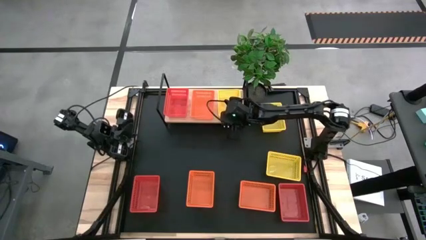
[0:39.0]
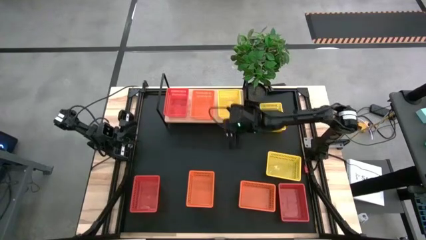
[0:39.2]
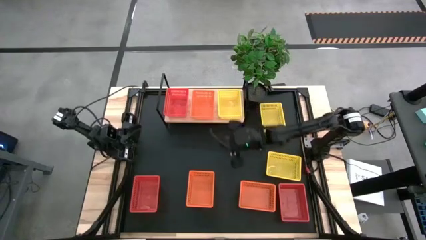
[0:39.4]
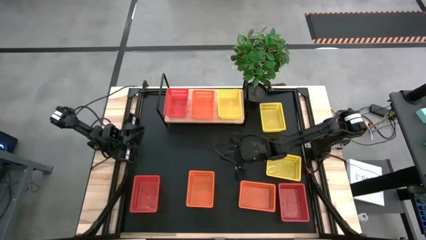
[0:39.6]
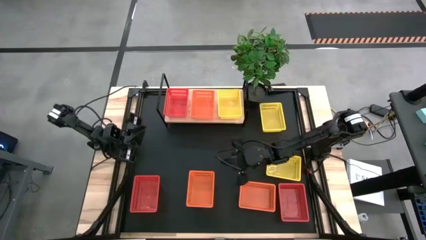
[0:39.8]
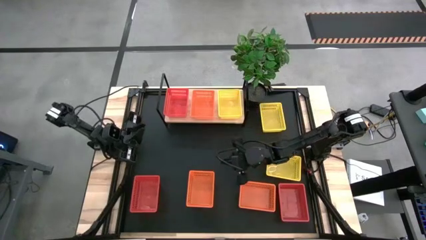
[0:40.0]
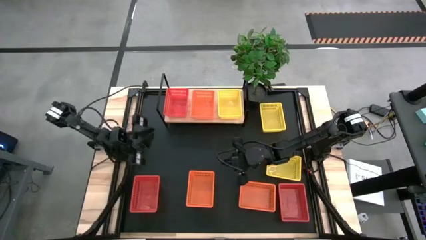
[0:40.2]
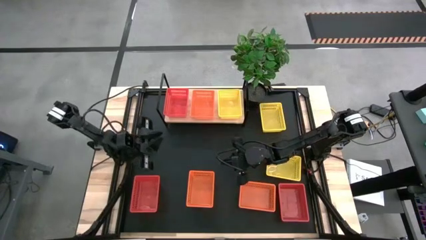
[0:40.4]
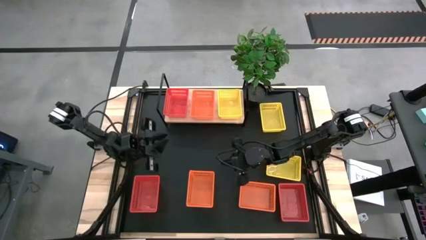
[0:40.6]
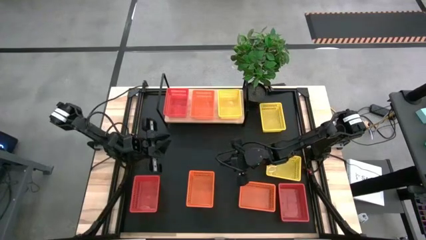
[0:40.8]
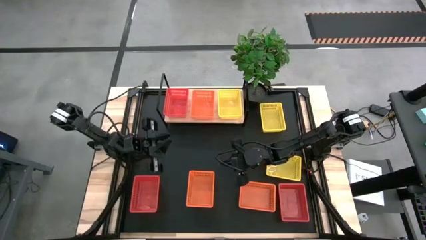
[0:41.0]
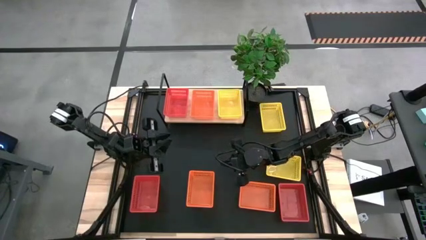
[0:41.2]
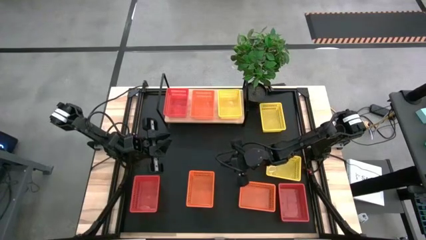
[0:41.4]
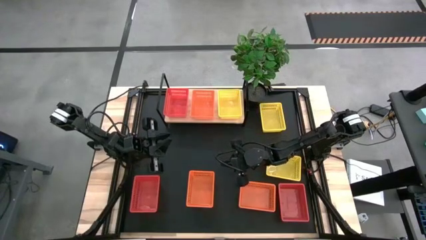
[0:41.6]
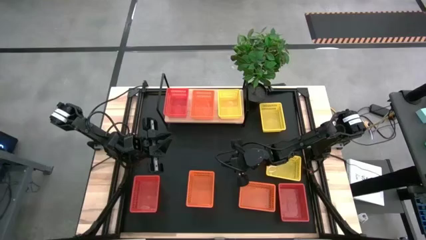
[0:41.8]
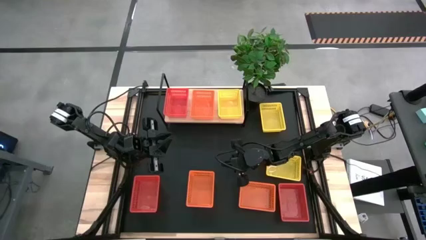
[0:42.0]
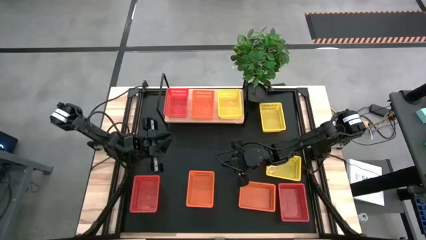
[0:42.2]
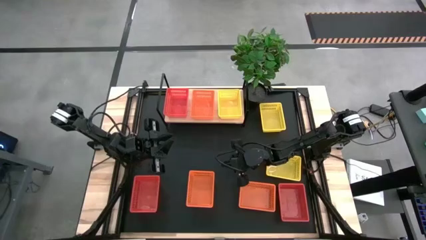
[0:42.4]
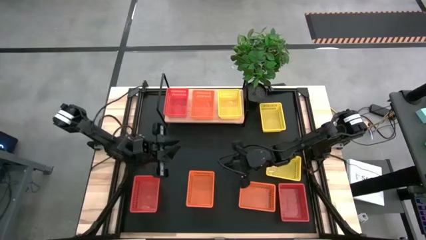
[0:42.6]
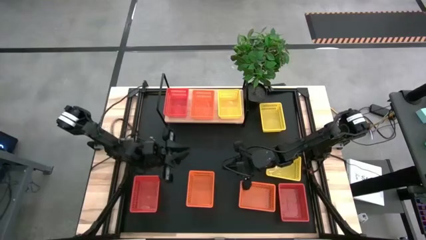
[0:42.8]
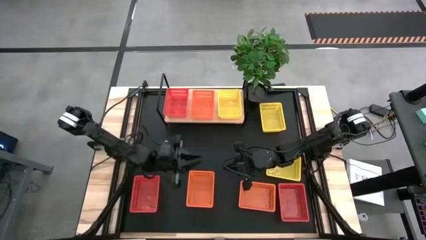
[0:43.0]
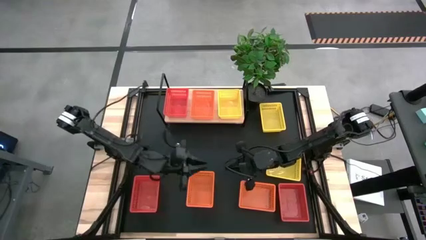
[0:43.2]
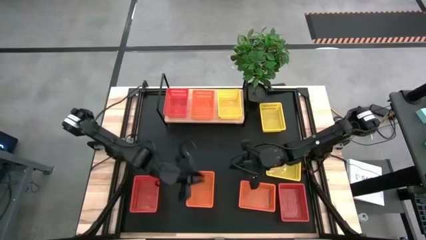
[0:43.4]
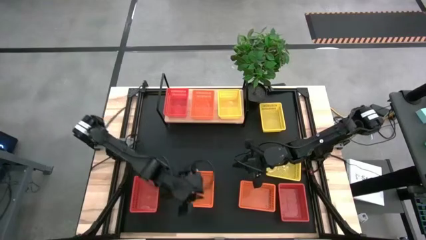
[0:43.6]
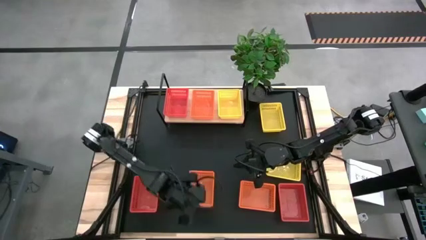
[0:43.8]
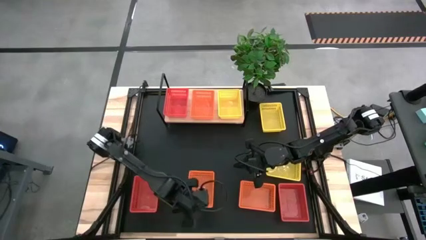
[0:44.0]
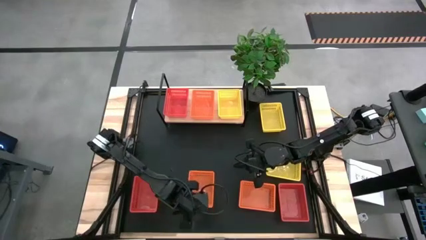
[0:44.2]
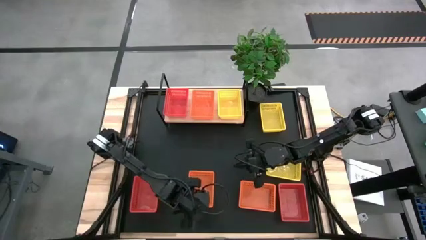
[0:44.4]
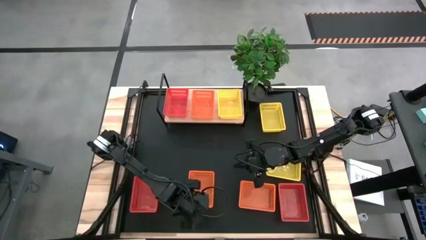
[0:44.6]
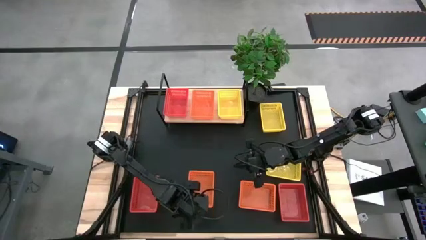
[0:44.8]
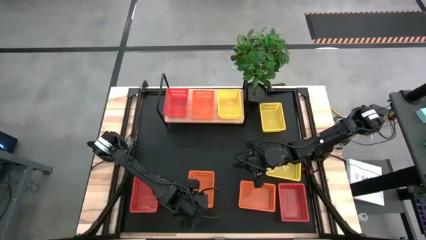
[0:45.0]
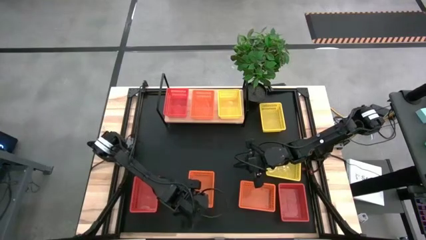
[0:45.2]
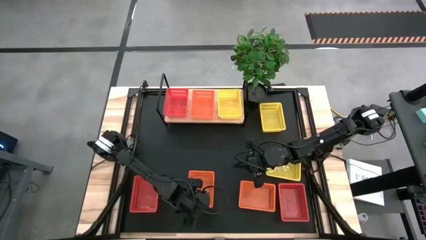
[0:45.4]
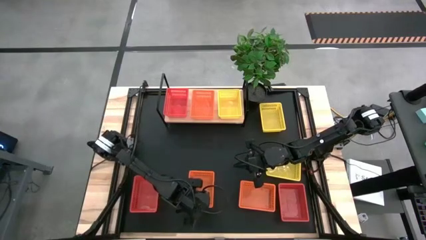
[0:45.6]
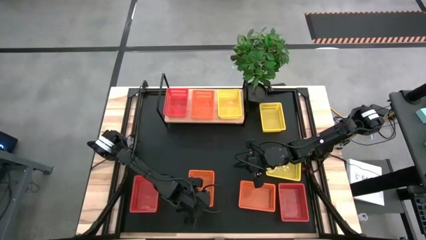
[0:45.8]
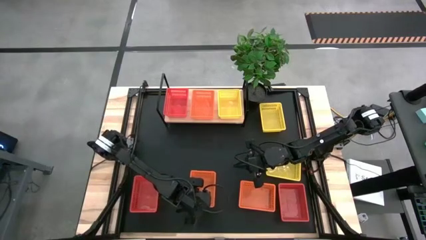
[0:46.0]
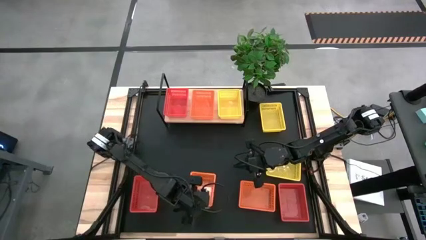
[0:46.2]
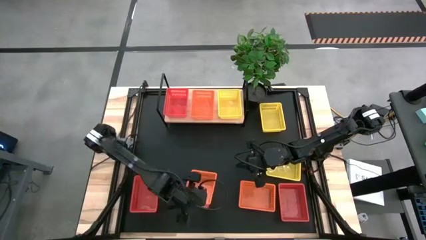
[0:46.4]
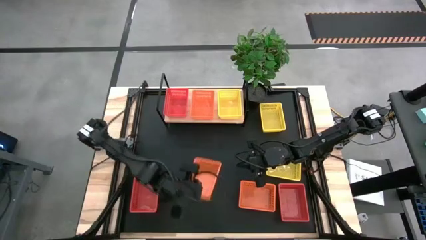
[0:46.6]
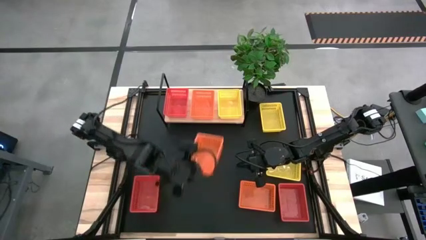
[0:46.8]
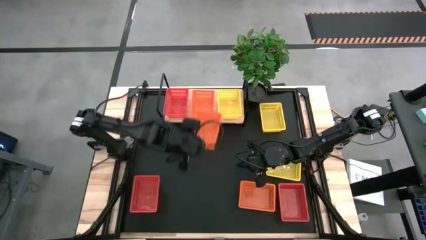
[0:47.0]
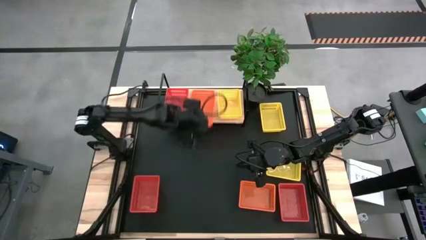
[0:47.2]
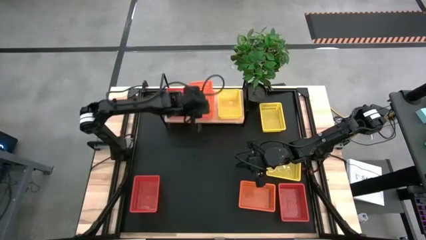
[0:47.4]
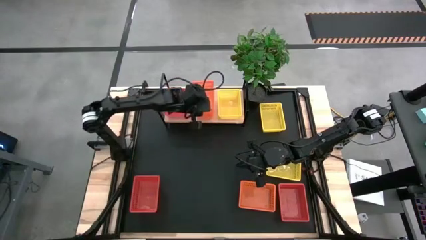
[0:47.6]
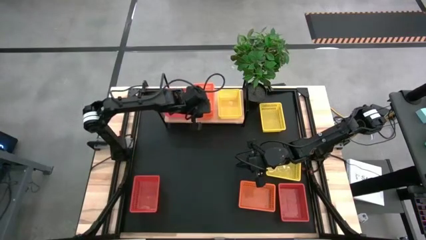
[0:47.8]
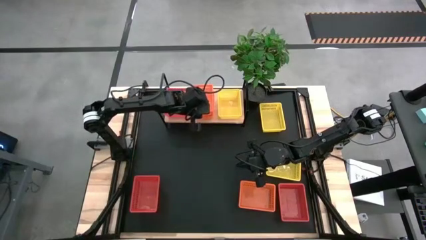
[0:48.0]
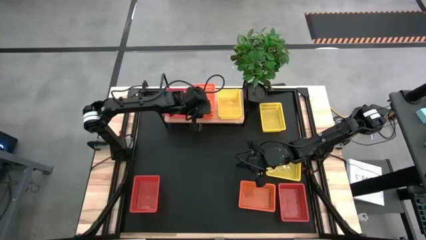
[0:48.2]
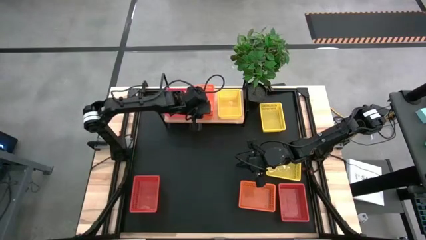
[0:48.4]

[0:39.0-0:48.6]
Task: Stack baskets on shelf by color
Stack the left orange bin on top of the orange bin on the shelf

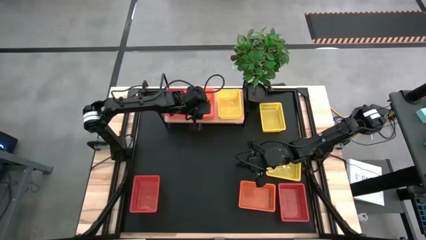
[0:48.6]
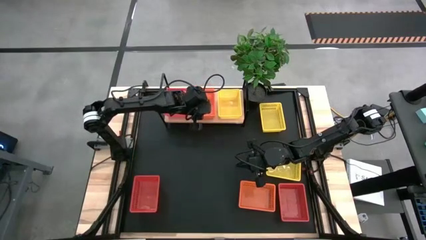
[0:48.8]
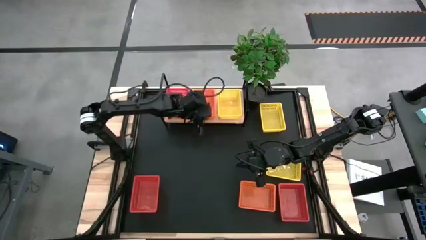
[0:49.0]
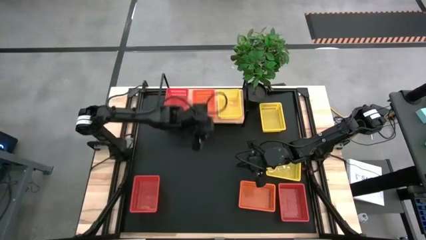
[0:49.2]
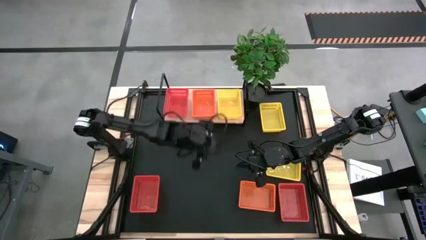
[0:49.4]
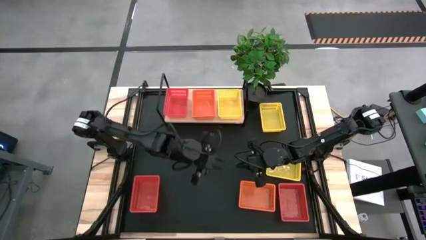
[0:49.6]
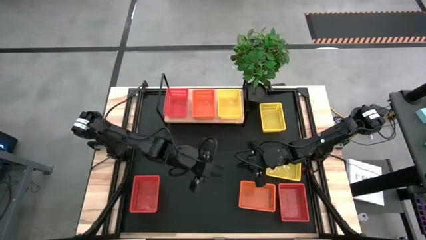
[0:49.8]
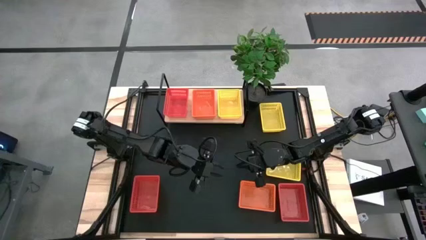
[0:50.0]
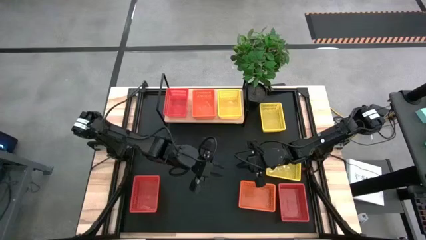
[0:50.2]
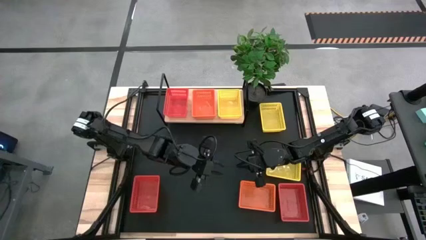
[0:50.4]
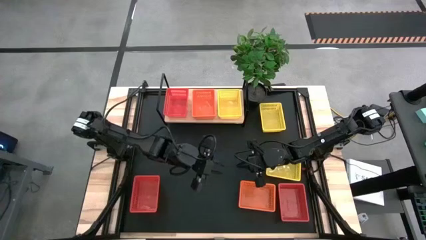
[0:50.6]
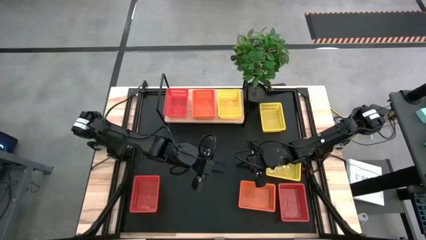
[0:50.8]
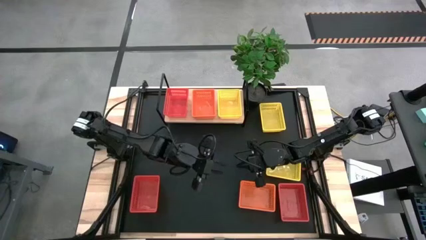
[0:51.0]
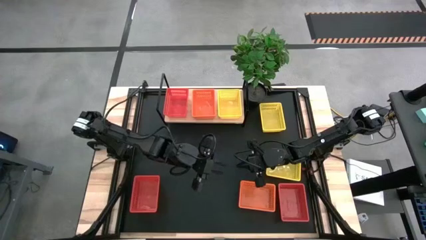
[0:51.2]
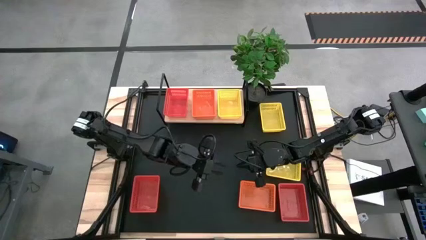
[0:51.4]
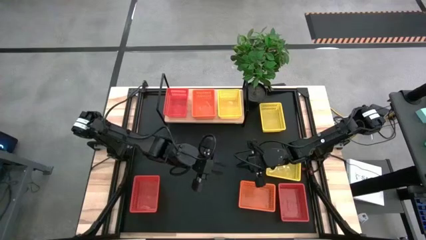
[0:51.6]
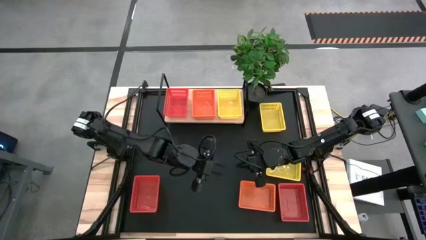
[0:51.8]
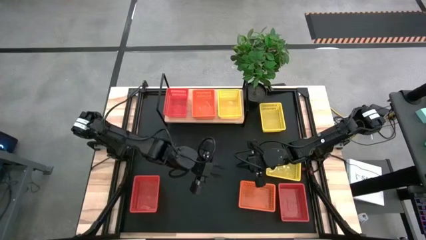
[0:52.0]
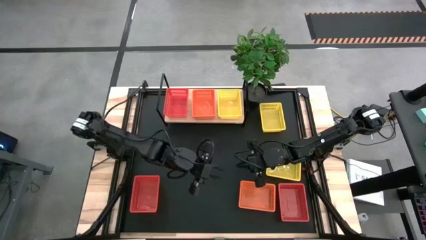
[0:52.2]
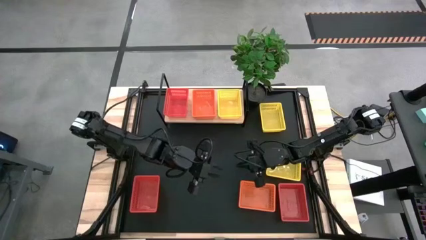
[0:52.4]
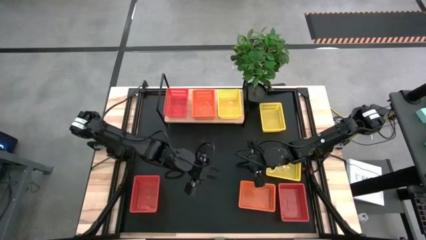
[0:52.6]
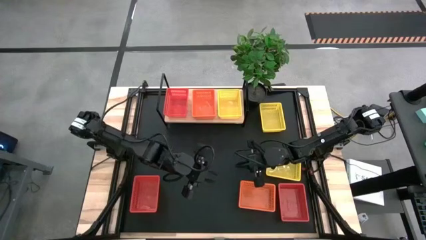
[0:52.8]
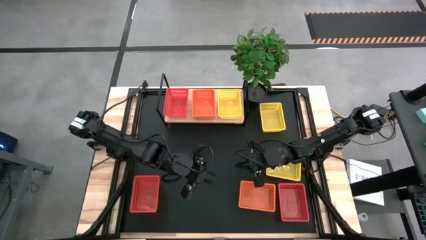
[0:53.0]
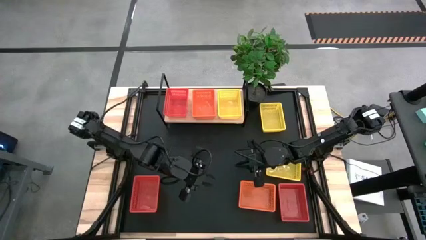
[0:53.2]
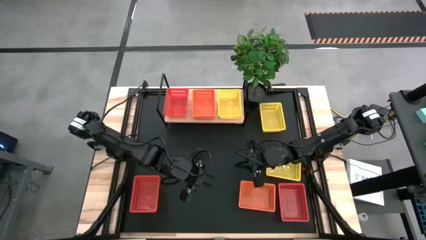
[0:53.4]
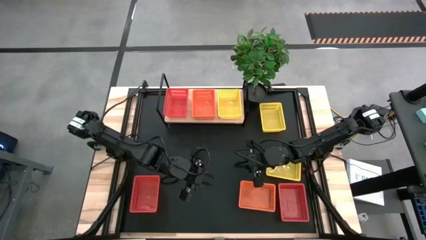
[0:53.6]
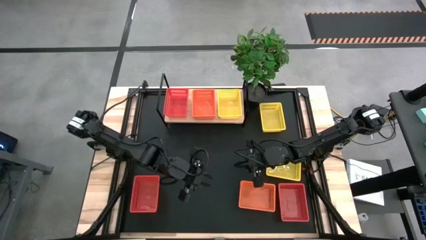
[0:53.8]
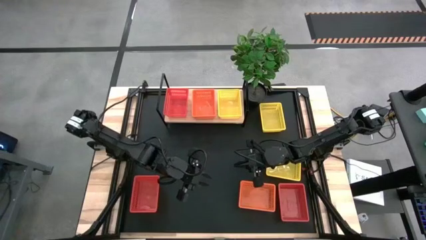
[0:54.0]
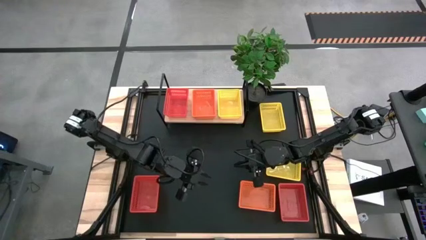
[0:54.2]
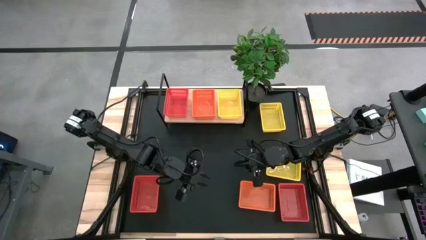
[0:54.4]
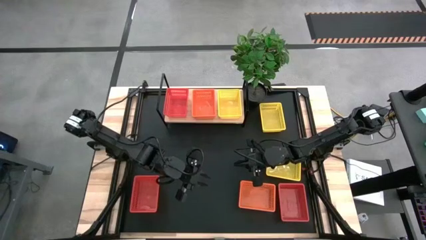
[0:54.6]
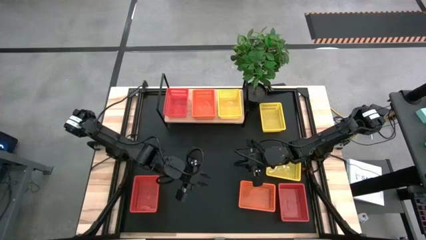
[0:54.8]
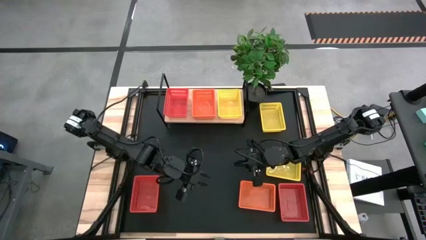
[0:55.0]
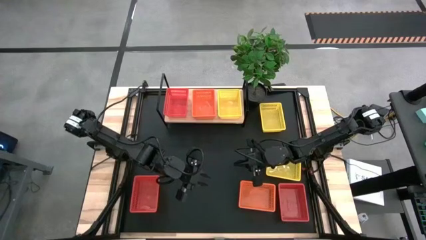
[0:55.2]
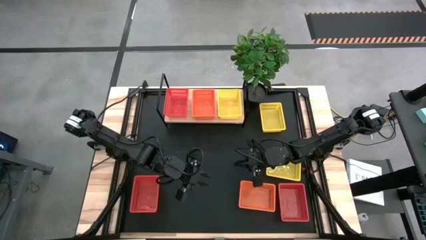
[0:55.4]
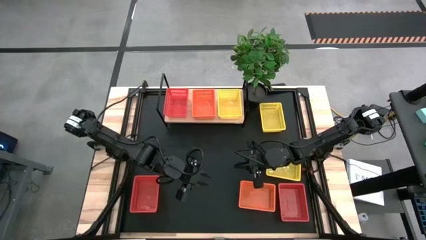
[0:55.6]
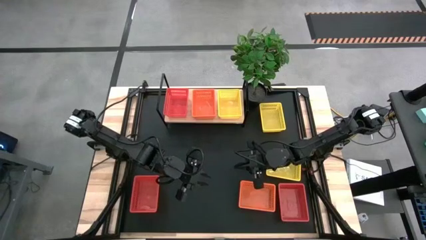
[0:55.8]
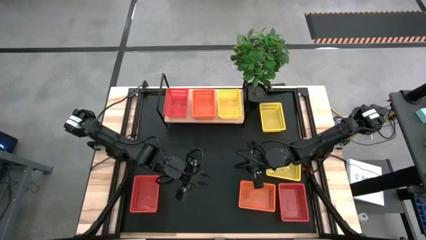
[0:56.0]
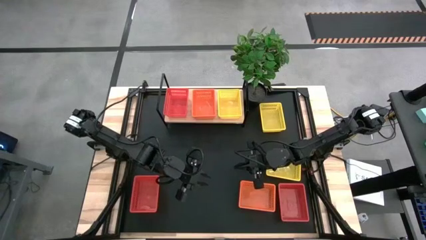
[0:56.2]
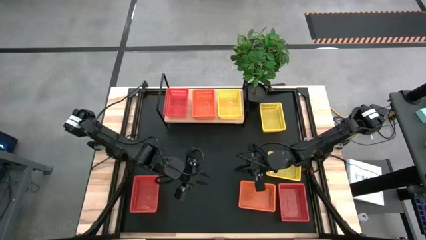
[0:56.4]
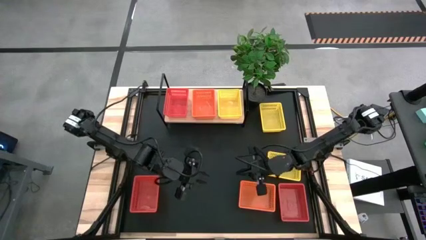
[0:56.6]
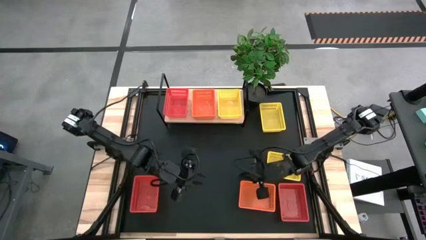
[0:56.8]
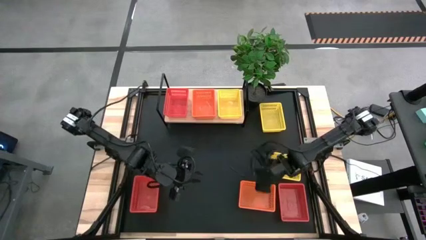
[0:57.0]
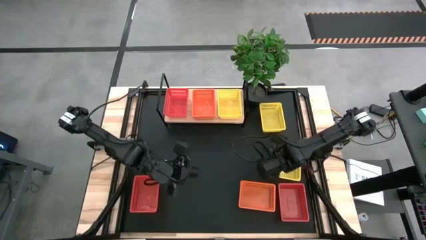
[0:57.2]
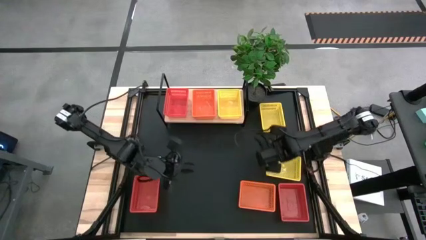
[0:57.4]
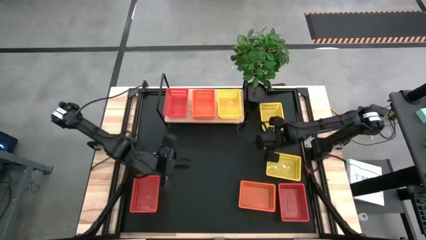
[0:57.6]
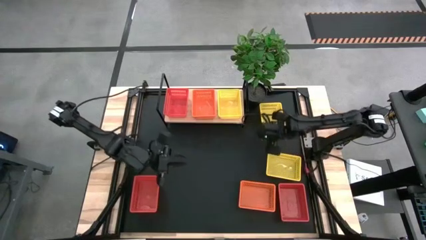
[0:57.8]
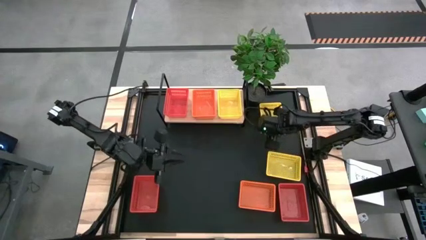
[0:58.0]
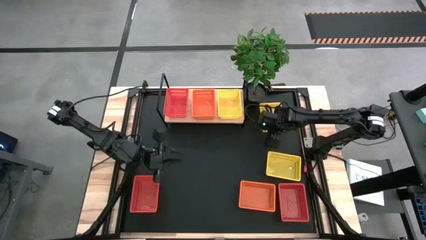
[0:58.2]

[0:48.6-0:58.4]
Stack the top yellow bin on top of the yellow bin on the shelf
